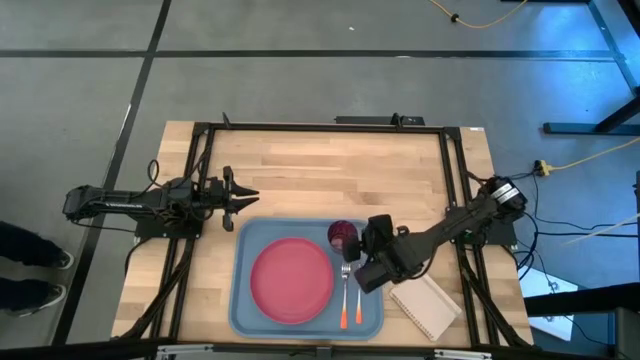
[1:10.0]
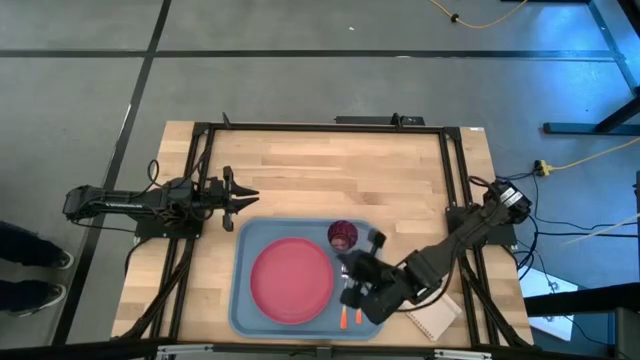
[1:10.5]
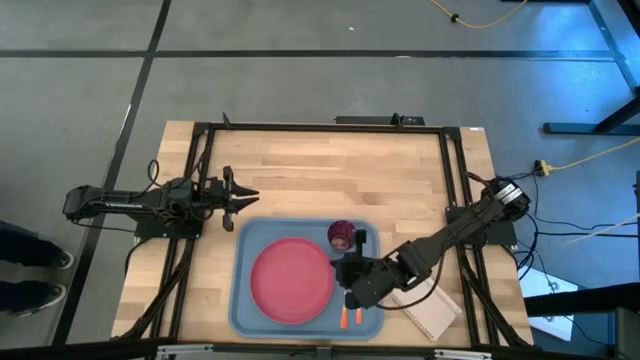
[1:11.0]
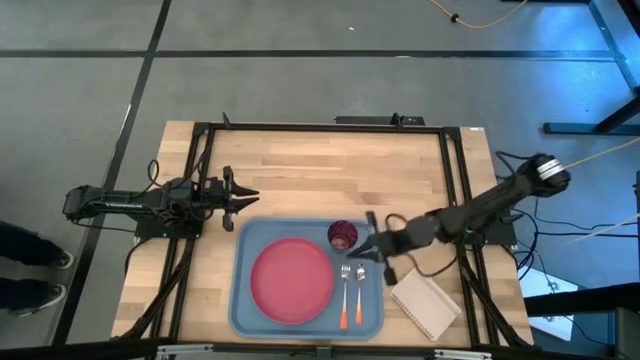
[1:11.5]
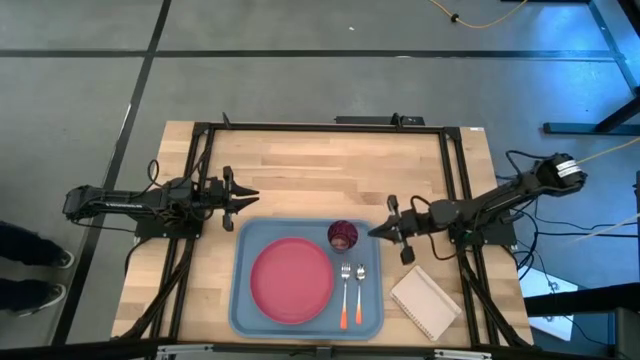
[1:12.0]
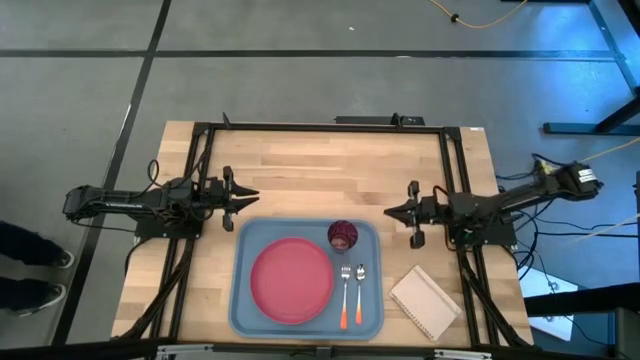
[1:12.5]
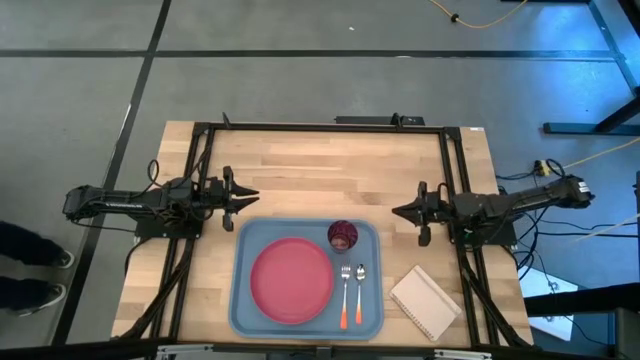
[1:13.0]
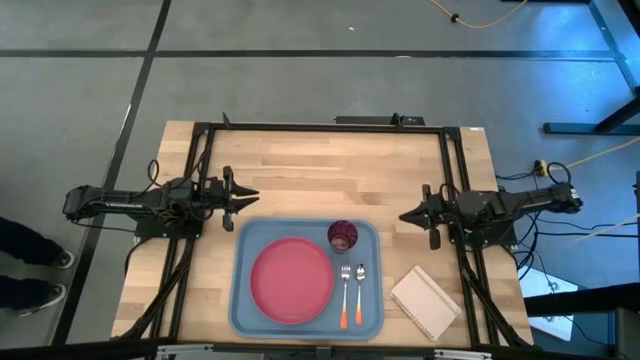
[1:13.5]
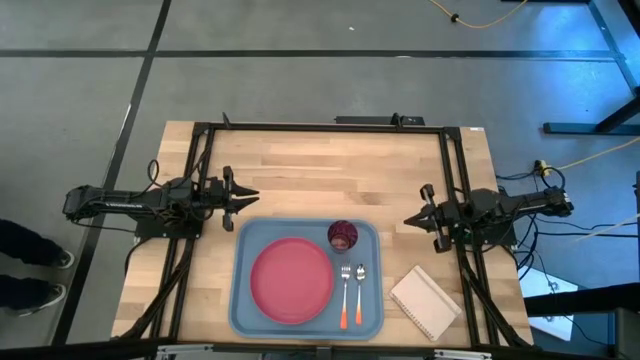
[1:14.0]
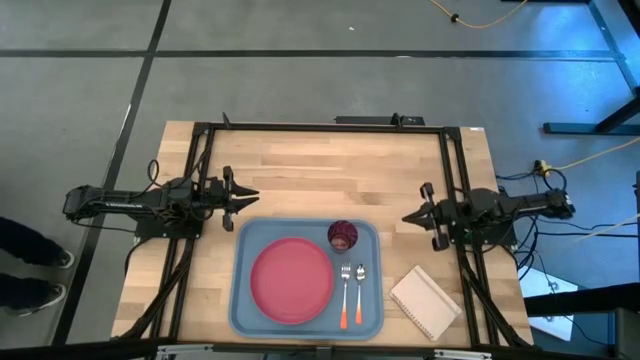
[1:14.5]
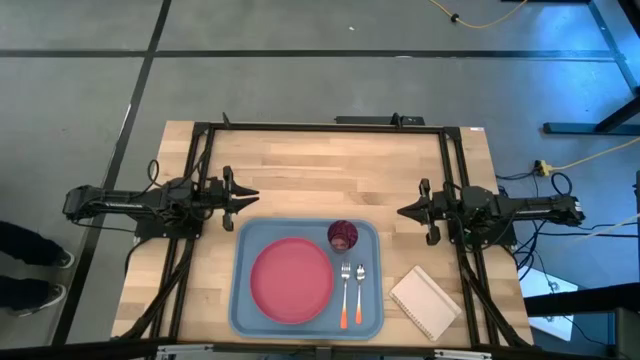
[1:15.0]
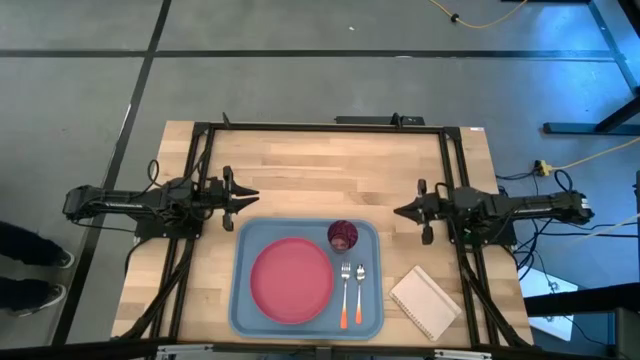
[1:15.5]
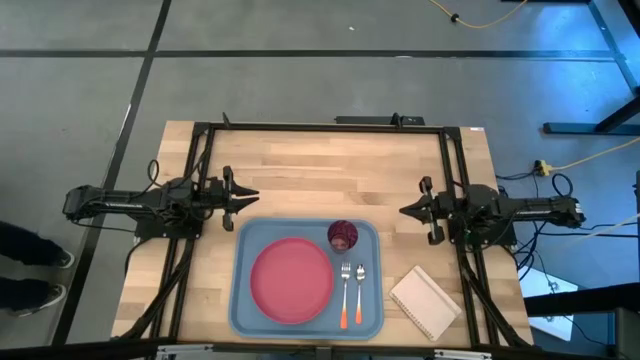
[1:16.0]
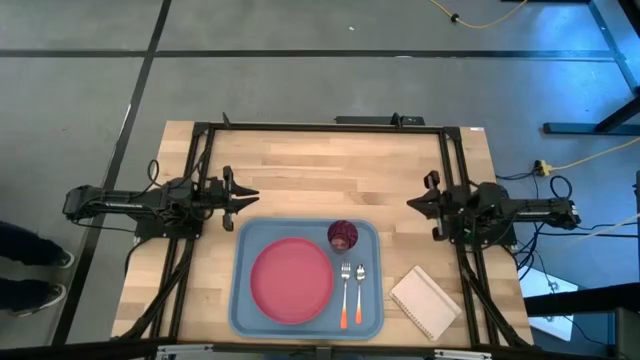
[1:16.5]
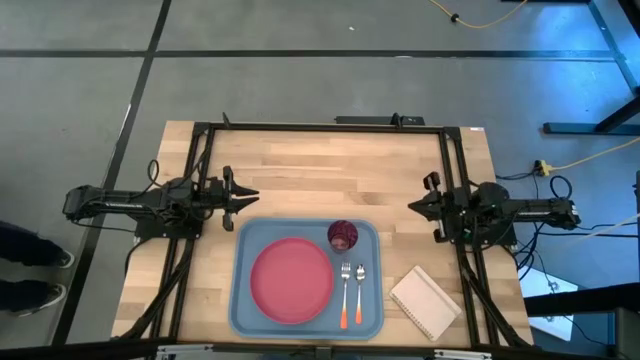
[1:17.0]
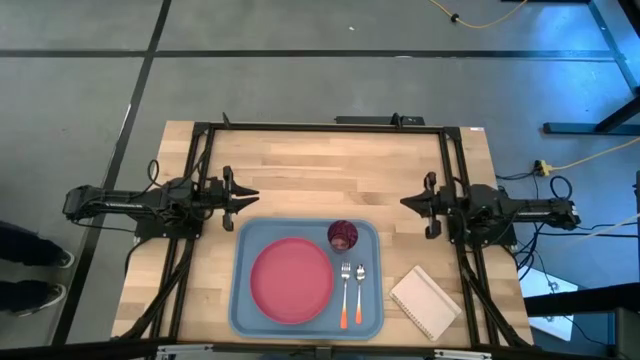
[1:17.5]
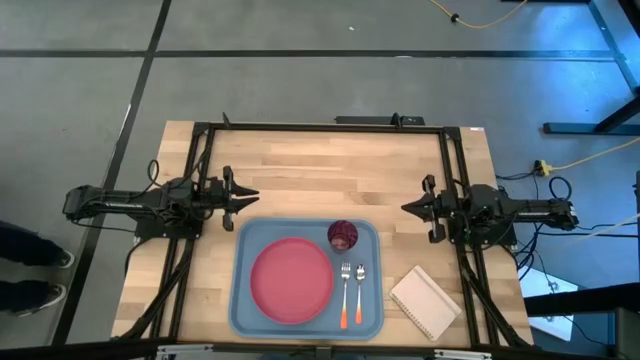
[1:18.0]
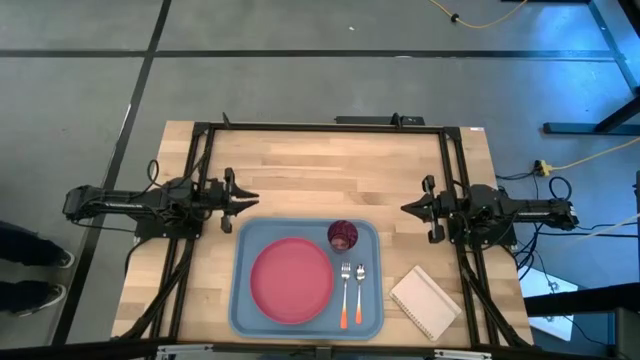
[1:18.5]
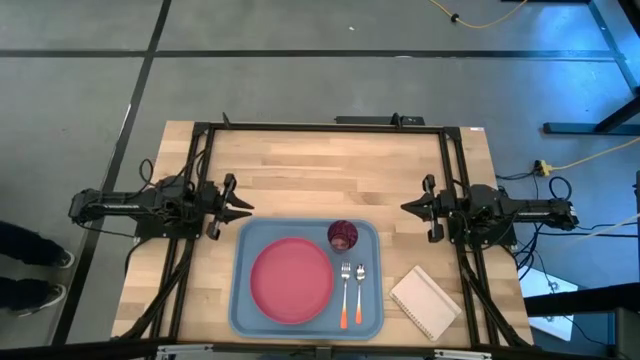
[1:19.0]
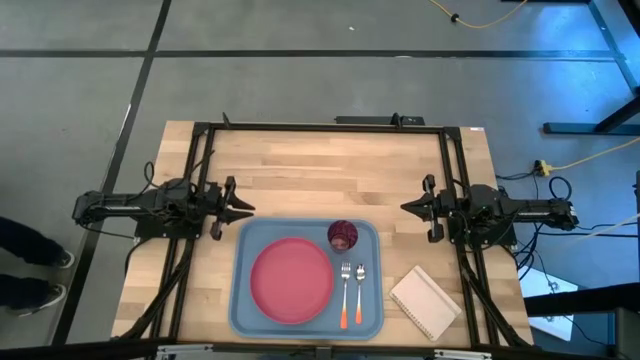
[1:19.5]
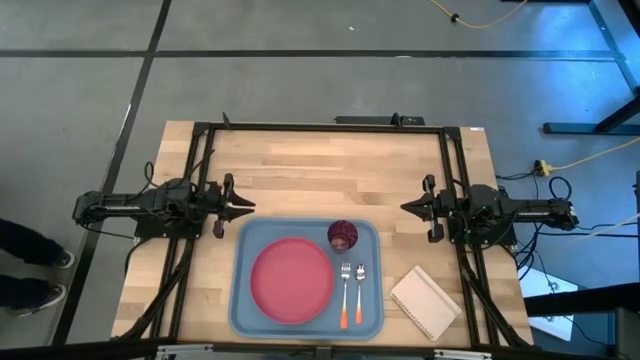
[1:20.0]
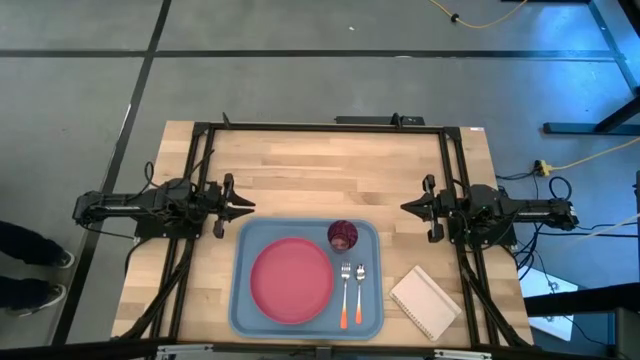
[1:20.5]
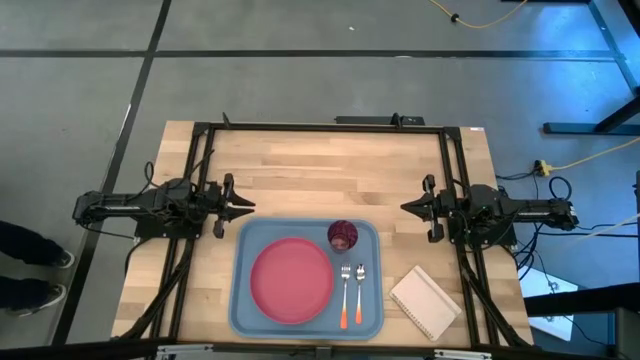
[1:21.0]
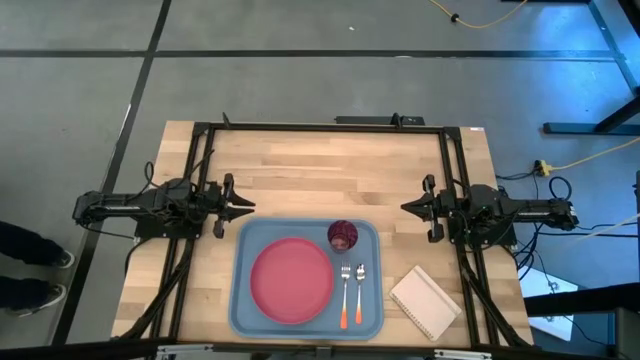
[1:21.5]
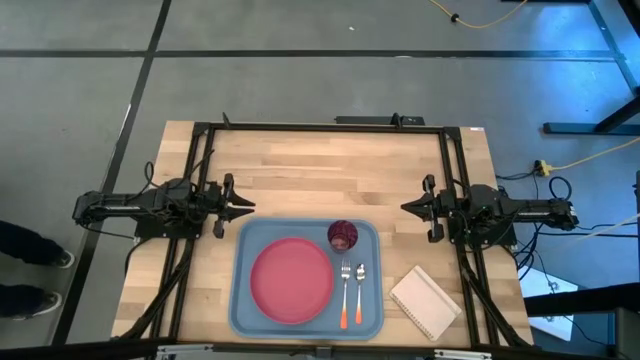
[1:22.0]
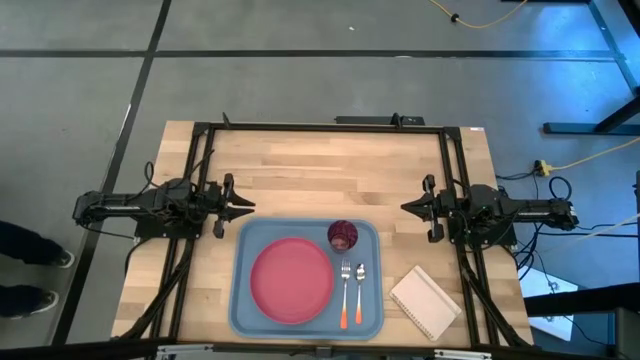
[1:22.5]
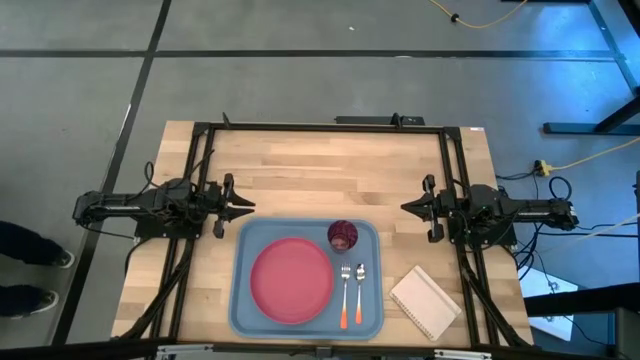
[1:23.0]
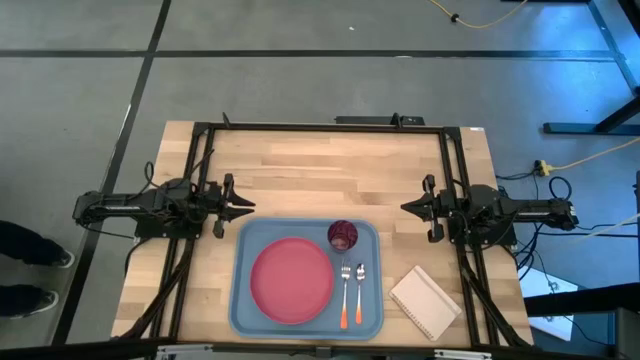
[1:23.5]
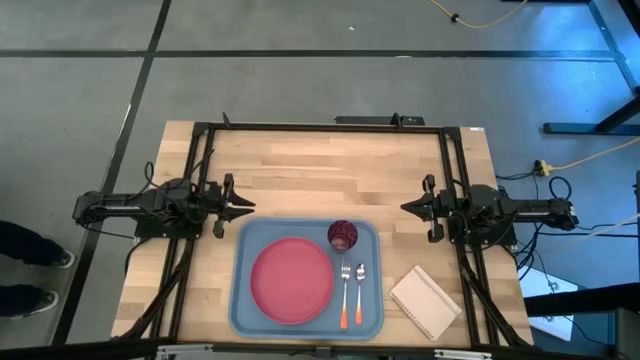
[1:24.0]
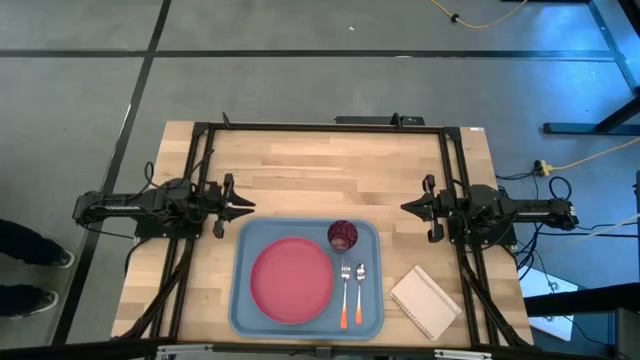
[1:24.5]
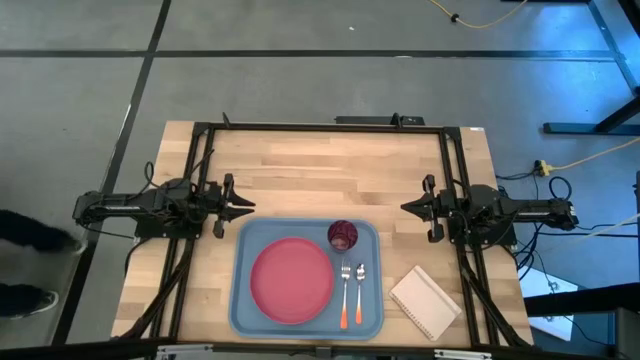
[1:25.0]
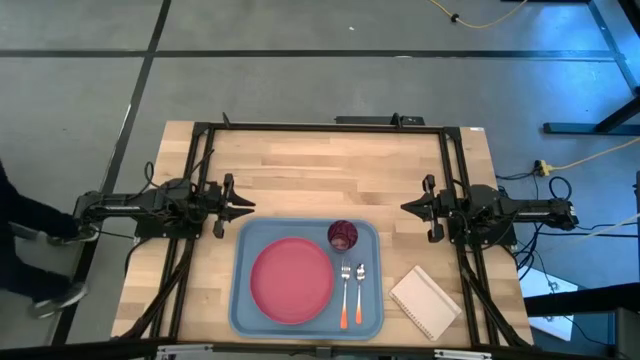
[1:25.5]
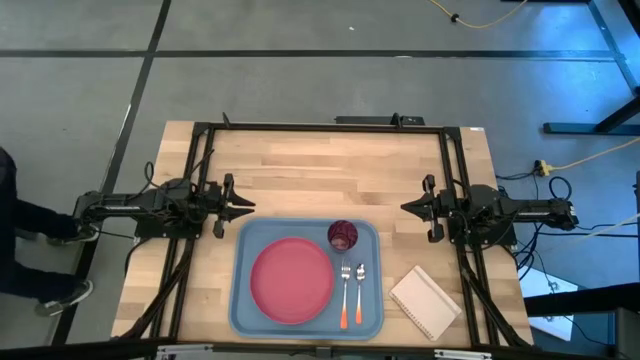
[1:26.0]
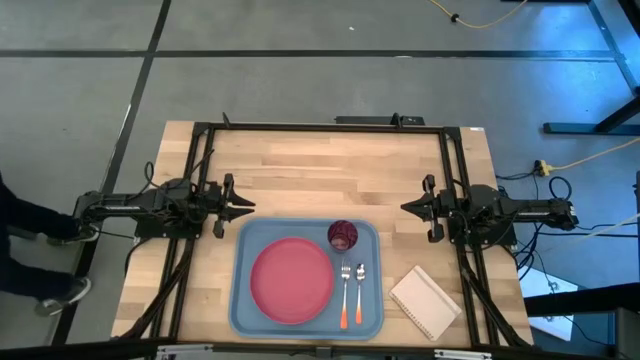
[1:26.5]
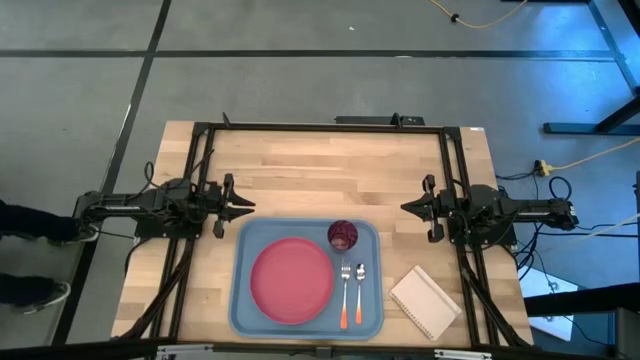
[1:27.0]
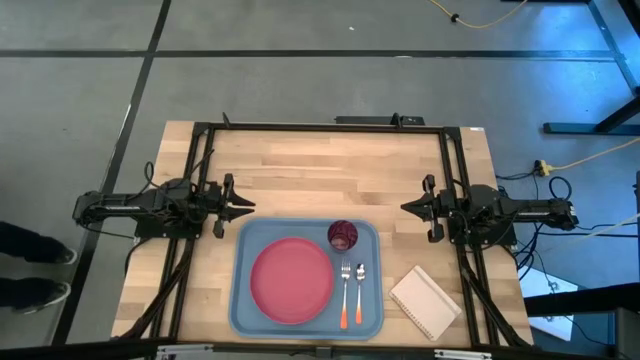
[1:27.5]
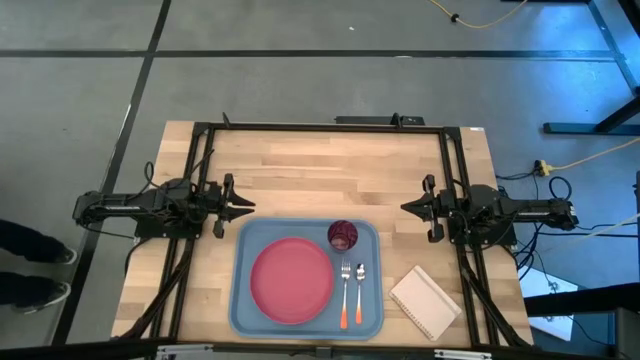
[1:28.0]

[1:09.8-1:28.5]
Task: Pick and place plate/cup/fork/spoon on tray
Return to Home Position

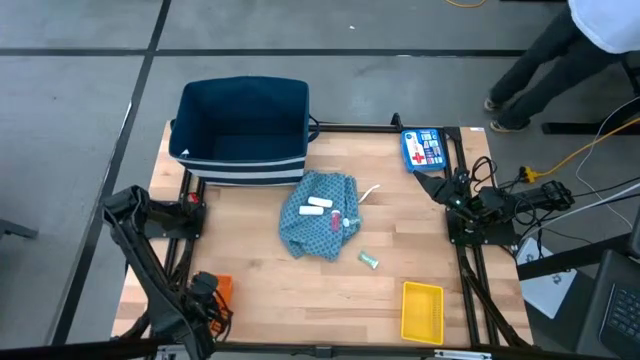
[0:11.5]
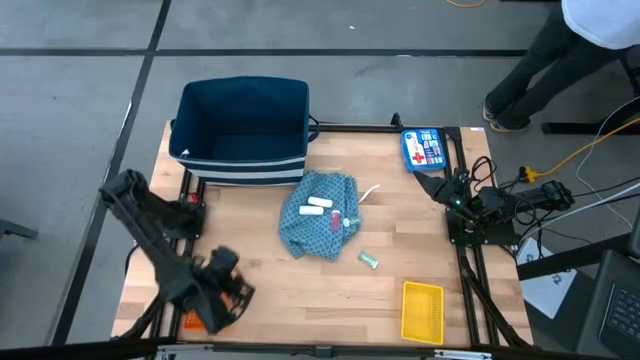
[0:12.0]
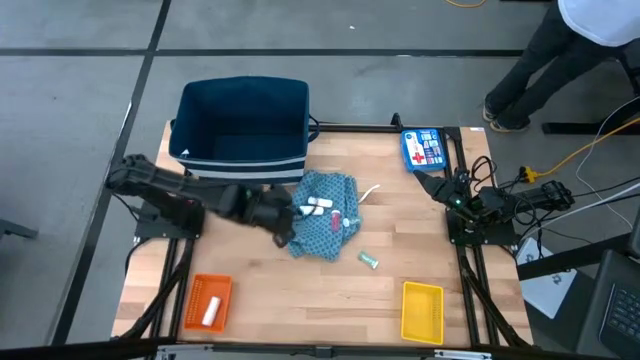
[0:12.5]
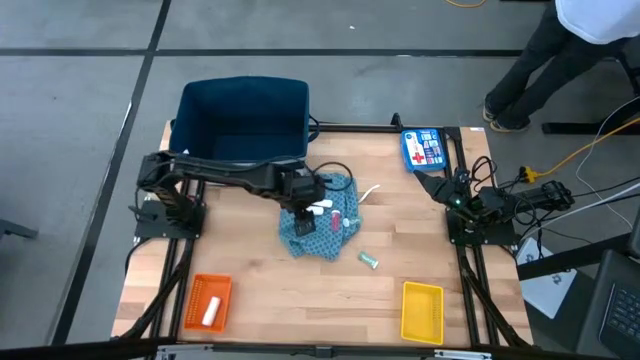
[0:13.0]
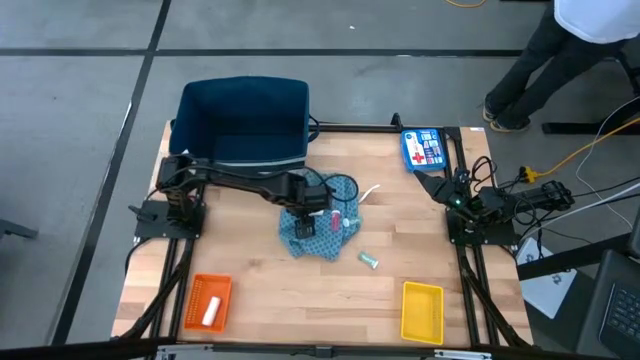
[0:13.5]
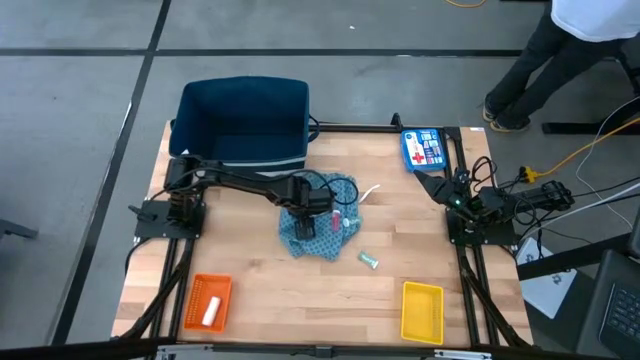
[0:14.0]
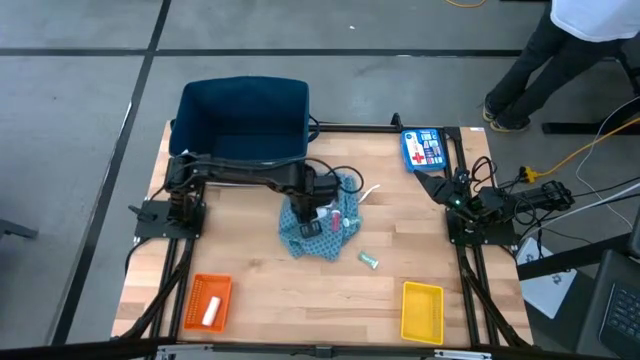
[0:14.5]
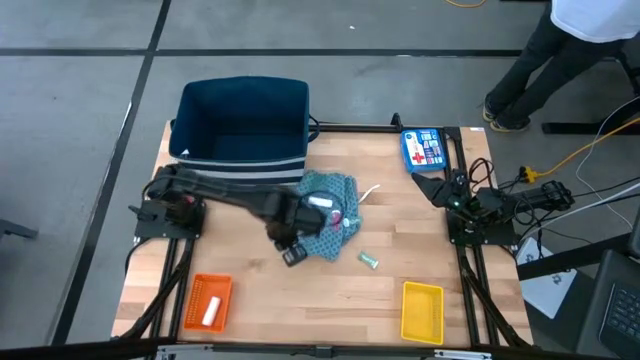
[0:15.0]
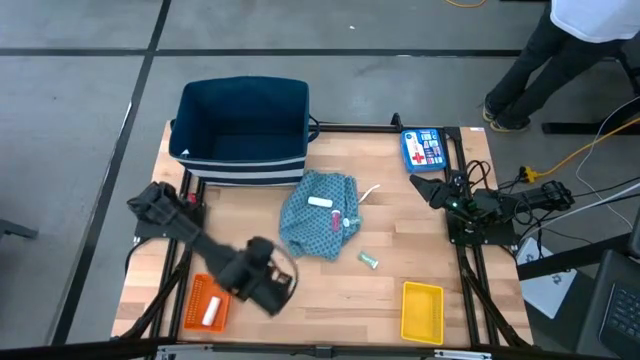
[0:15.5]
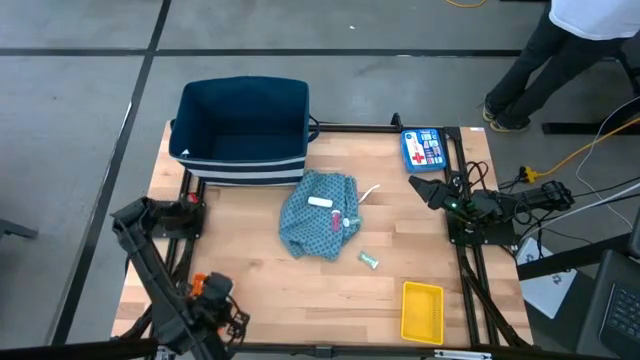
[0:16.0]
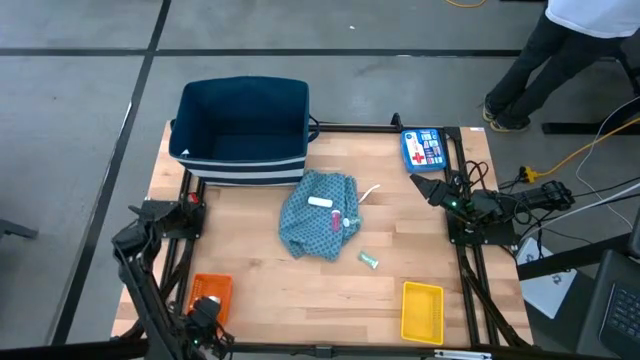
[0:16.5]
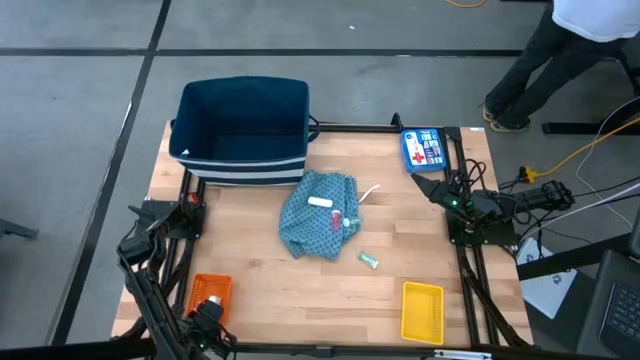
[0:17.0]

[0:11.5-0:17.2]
Task: Pick & Place Medicine items
Put the bottom white rolled gauze into the orange bin
